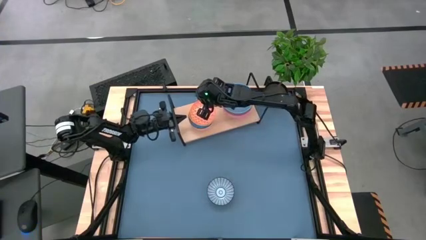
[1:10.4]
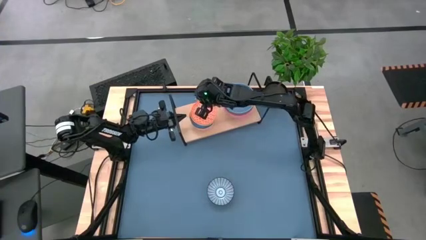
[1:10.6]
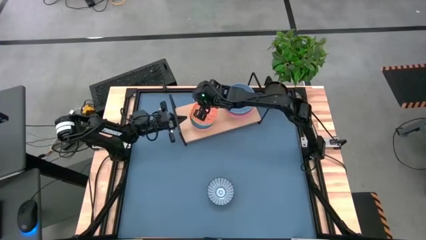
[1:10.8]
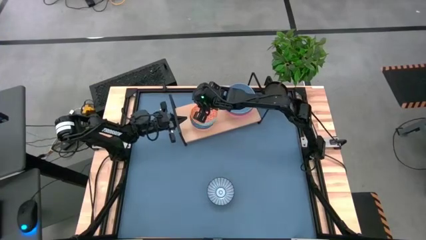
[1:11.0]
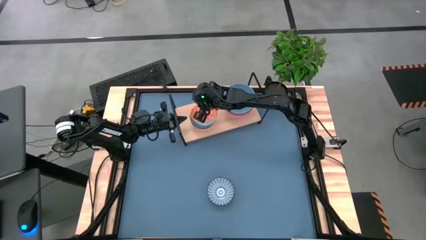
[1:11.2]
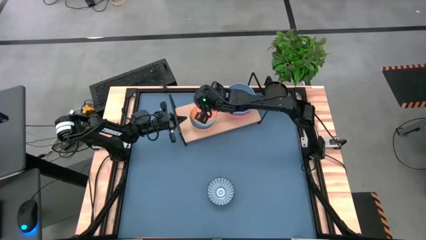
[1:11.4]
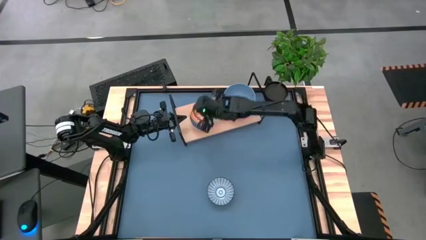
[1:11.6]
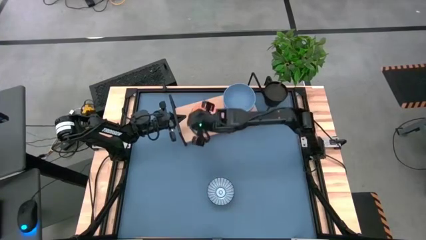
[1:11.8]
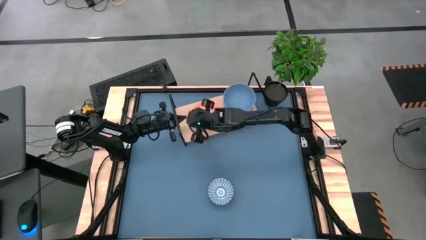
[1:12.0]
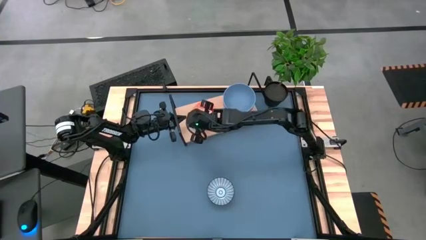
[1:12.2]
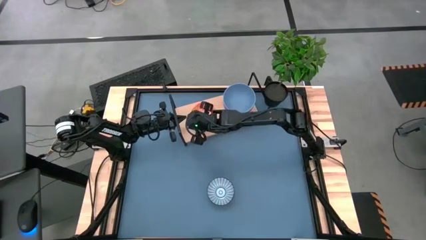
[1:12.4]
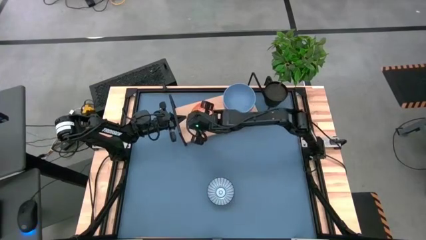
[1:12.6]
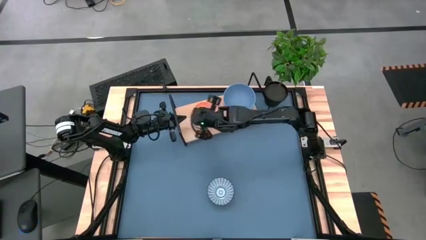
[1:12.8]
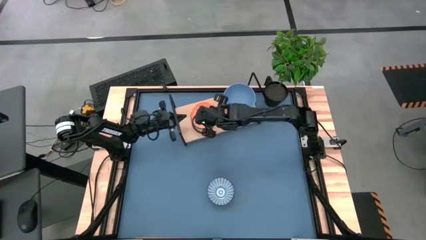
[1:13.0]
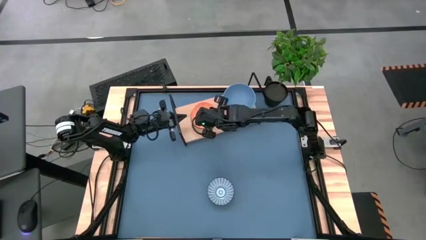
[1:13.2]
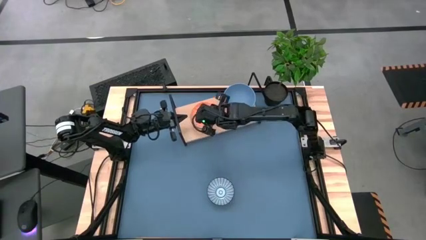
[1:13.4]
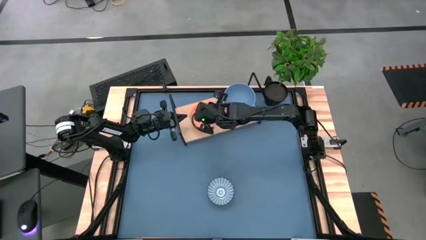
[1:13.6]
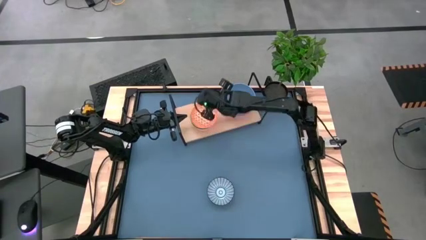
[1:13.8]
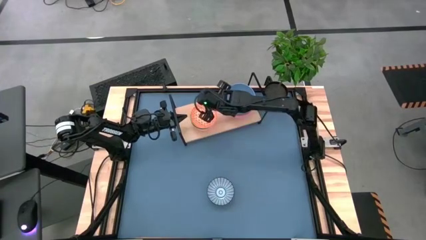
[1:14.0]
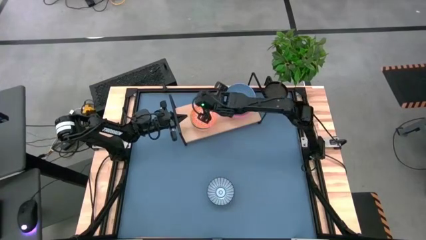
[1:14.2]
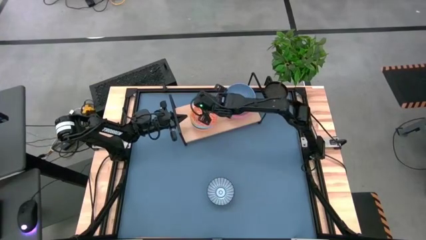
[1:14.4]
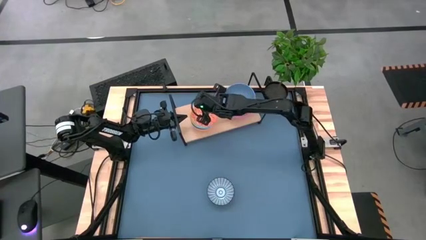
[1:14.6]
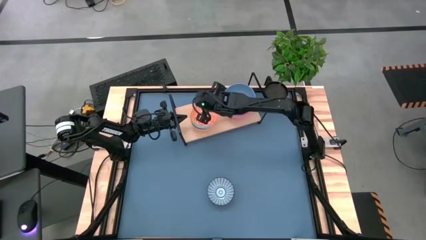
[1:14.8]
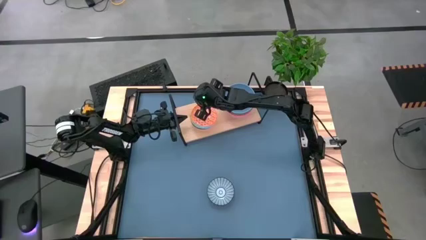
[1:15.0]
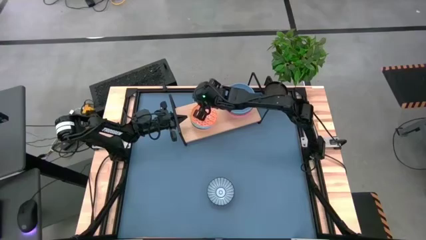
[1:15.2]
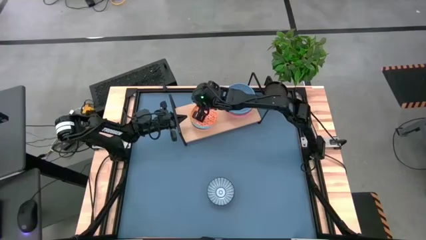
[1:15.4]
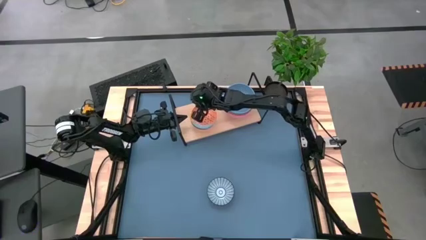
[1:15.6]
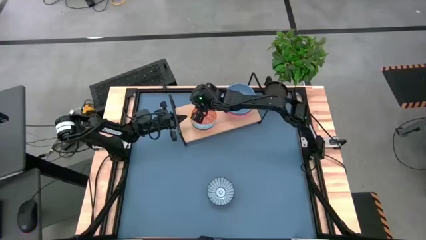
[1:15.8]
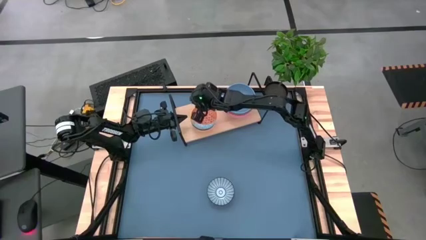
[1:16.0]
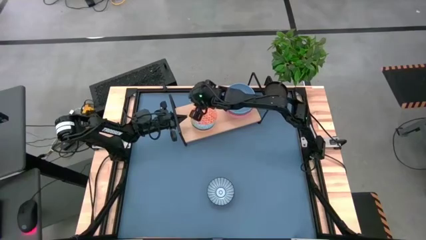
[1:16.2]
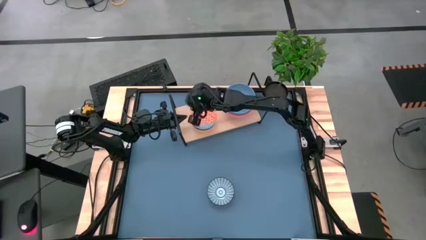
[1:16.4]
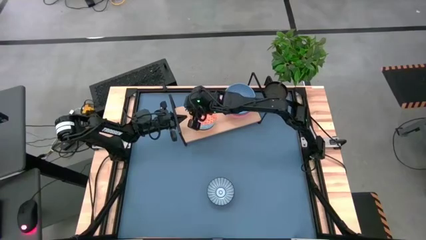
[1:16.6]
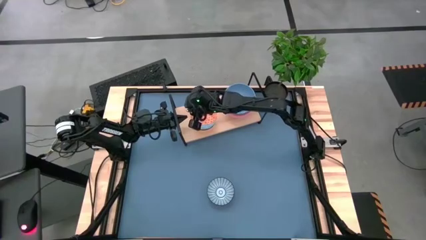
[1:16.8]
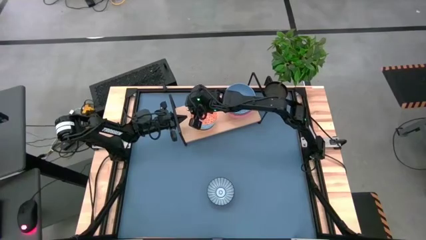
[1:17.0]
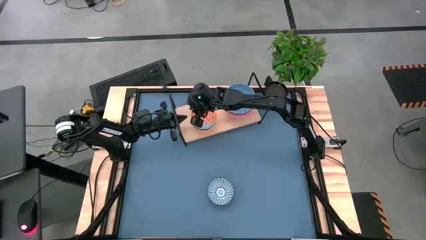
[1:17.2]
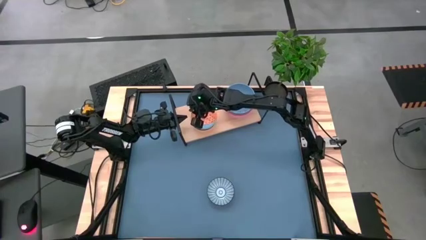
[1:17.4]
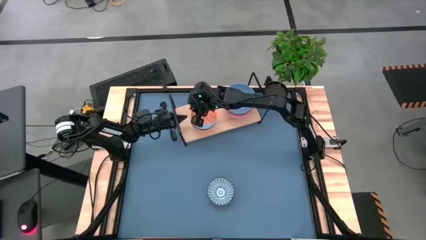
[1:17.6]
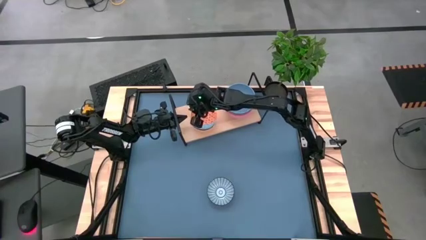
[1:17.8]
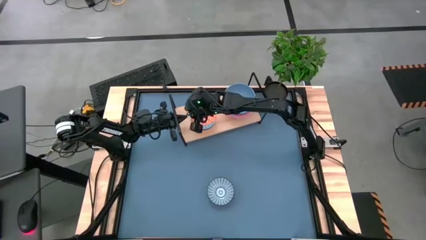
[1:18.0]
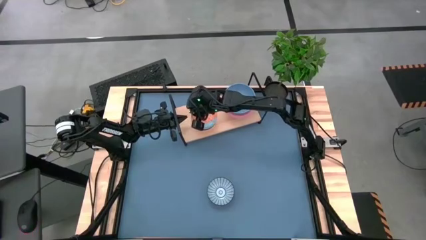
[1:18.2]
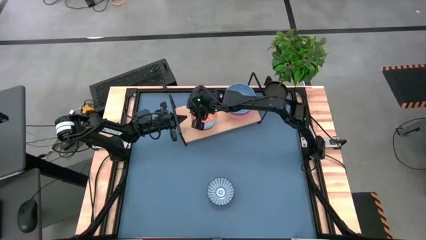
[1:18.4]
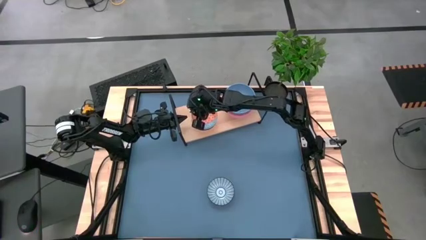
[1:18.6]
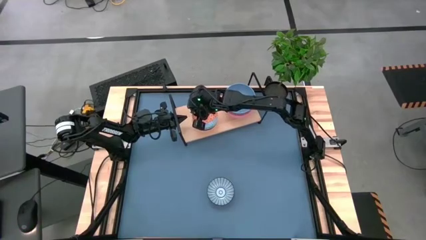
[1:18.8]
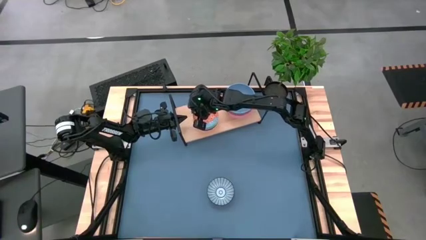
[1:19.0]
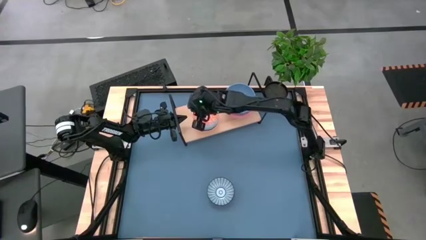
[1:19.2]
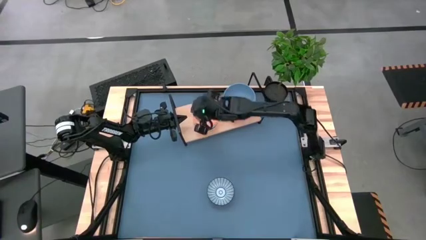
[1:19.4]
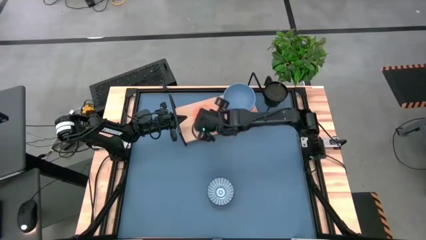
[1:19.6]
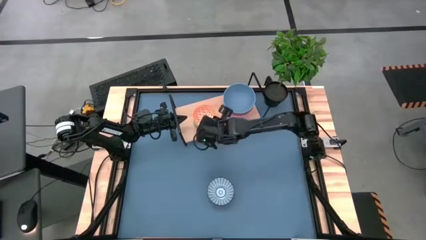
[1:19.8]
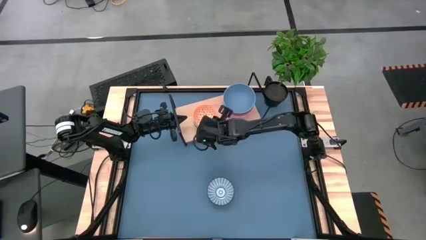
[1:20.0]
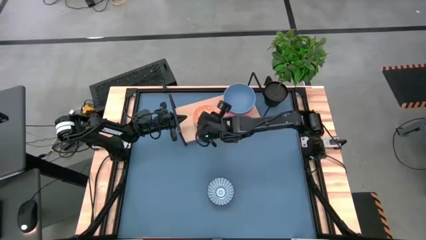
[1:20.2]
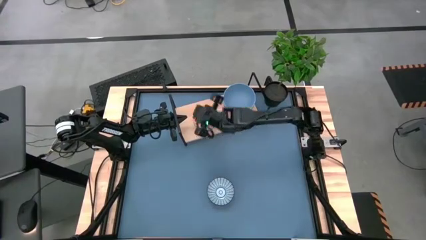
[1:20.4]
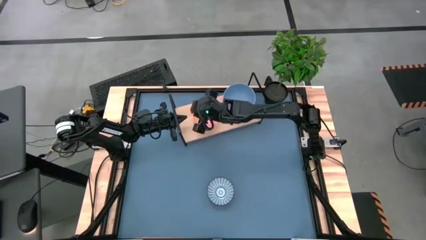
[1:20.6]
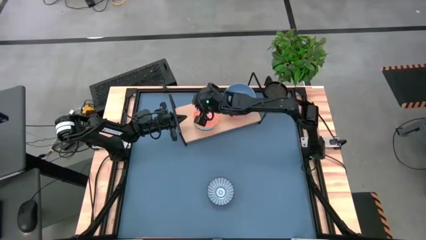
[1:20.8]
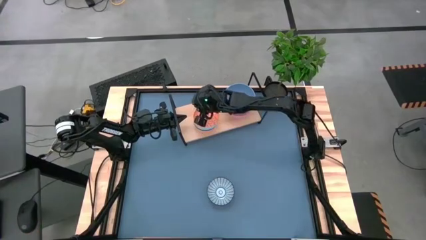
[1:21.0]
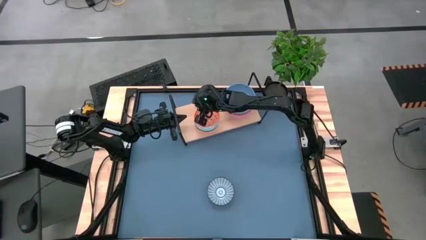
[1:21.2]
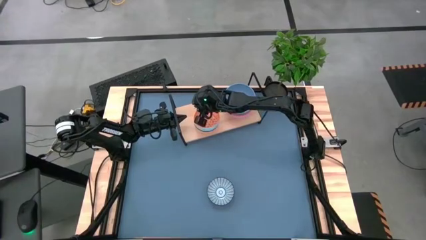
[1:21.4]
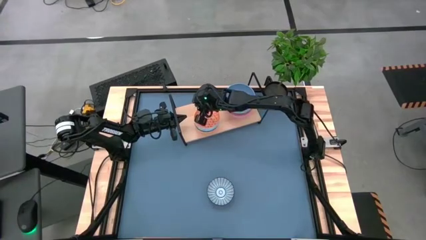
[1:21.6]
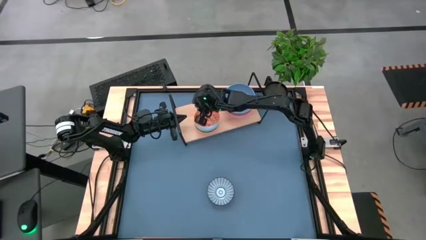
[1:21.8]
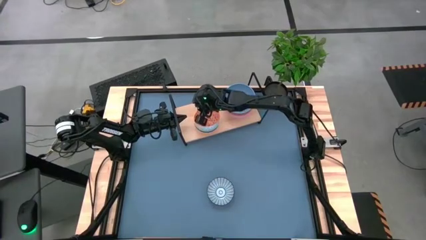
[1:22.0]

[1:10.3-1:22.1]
Task: Place and stack bowls onto a shelf
Adjust the stacked colored bowls

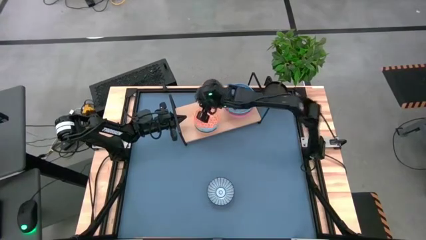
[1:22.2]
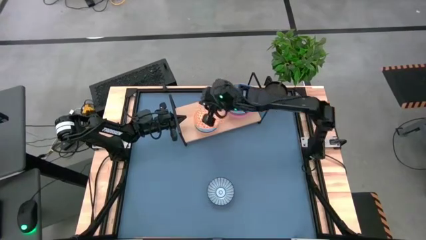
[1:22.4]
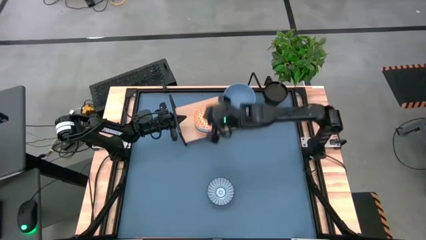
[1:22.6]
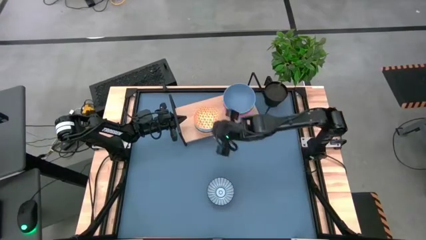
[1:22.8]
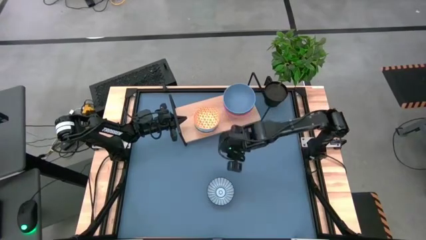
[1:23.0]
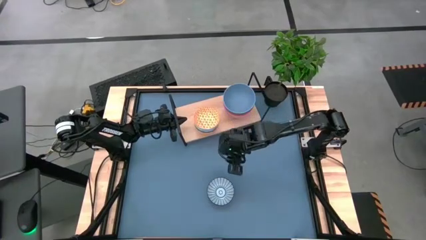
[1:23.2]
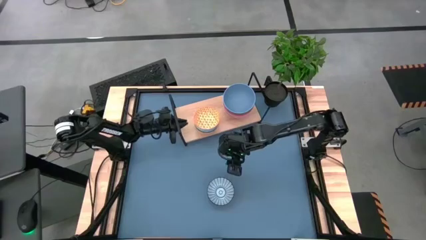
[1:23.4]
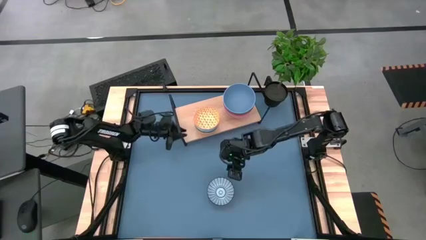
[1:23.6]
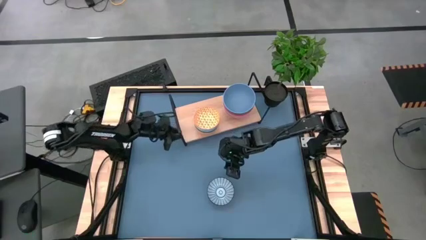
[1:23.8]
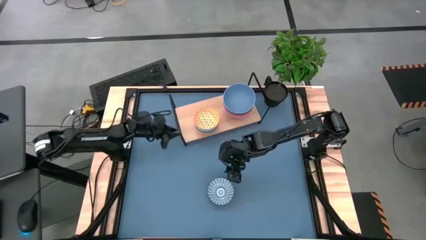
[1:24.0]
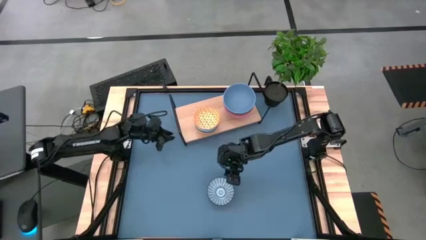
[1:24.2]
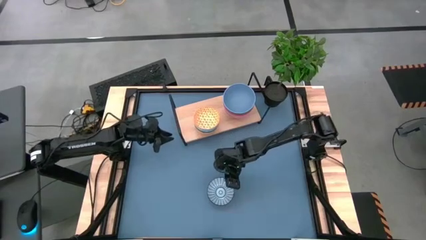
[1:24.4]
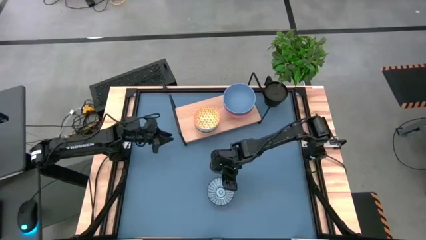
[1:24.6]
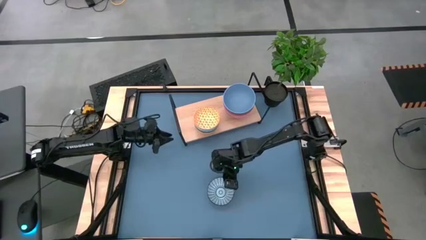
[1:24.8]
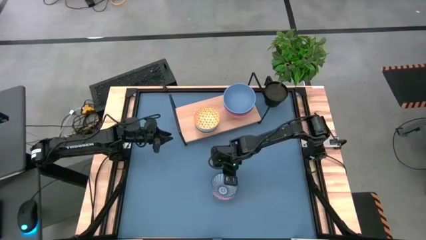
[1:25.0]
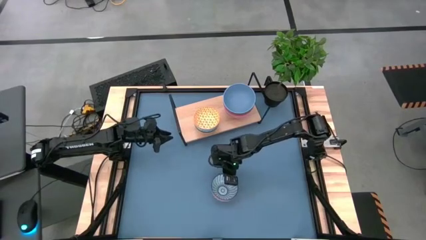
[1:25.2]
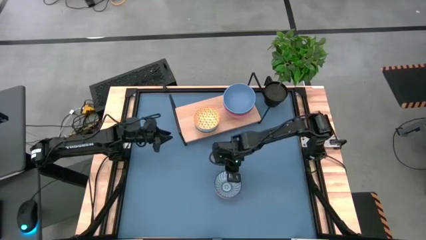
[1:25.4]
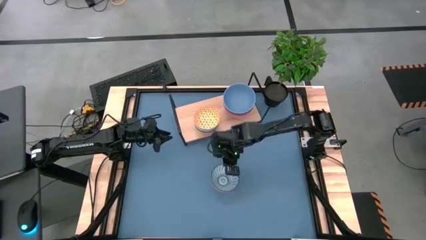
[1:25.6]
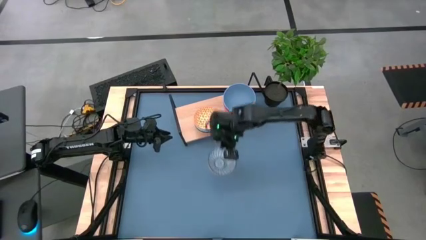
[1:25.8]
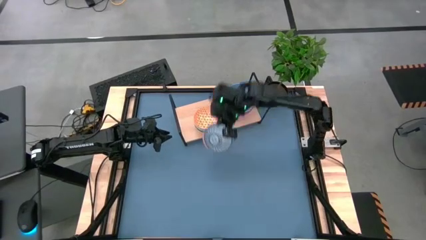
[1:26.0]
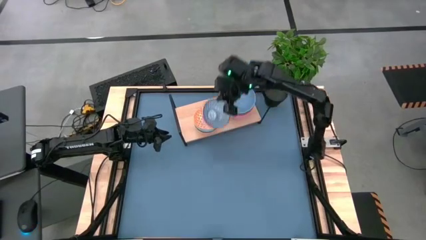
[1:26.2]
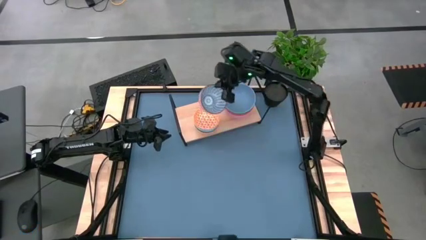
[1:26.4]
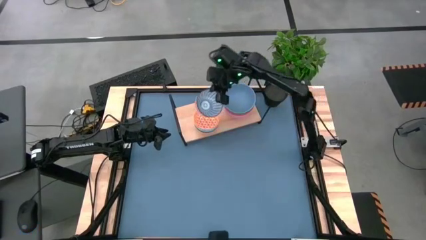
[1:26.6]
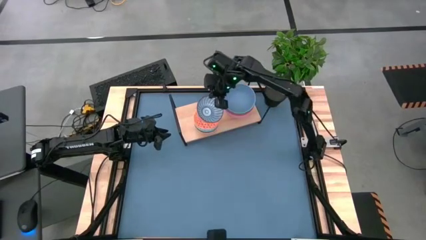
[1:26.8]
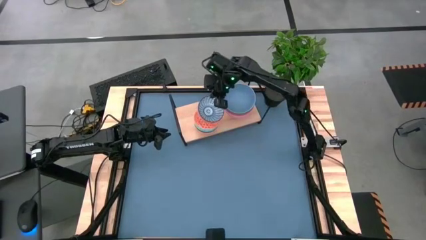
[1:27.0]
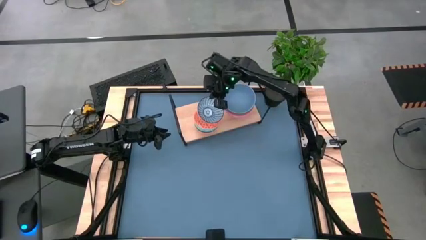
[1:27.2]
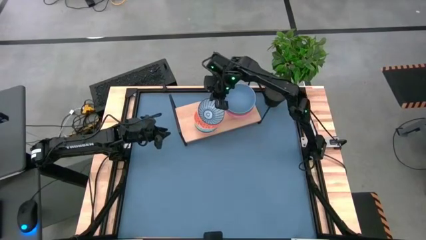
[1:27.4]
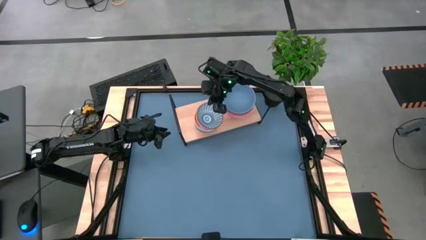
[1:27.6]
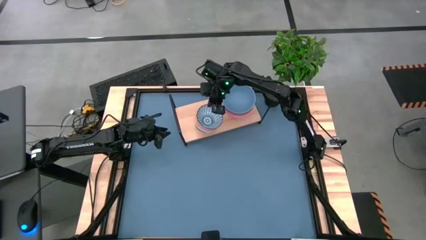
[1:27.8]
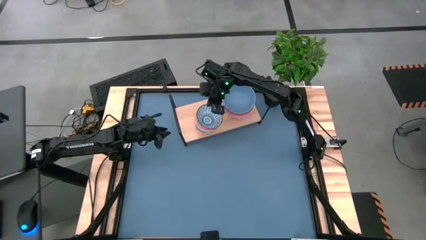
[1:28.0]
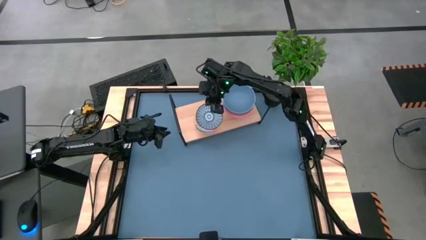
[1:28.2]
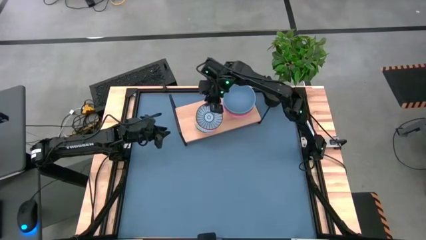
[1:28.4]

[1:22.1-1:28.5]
Stack the dark blue bowl on top of the orange bowl on the shelf
